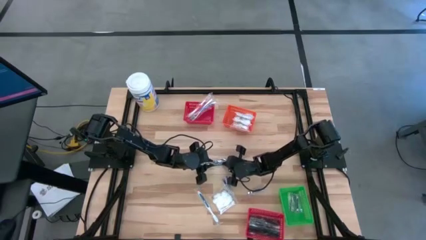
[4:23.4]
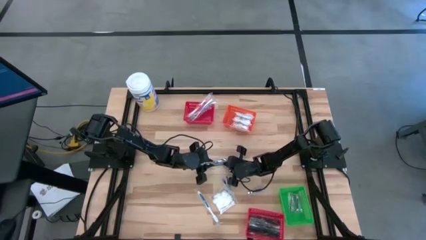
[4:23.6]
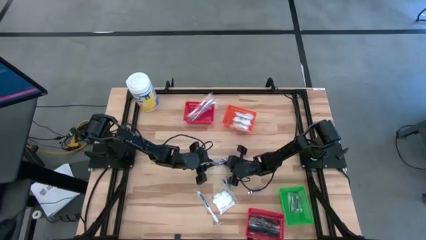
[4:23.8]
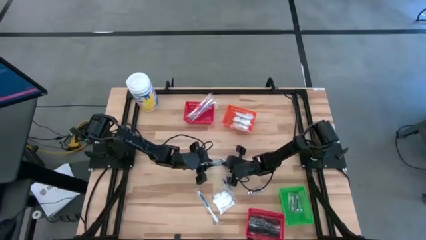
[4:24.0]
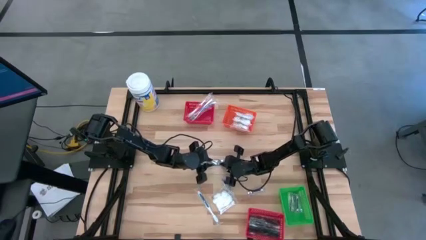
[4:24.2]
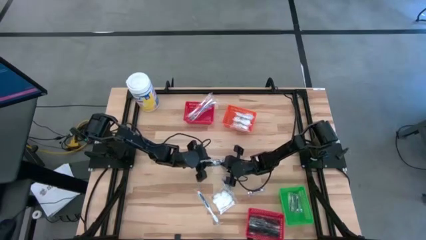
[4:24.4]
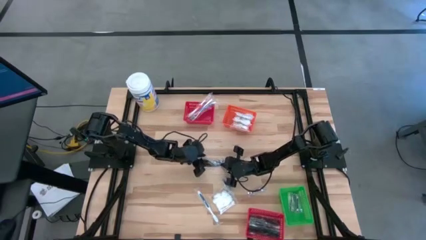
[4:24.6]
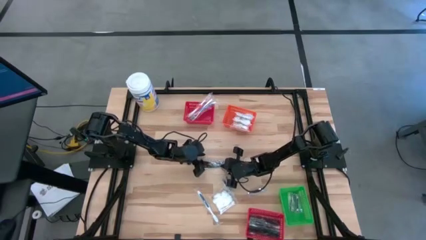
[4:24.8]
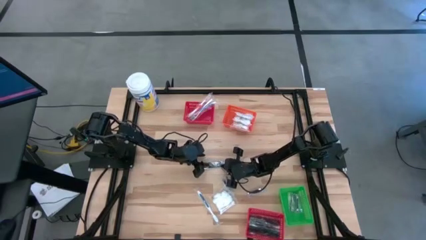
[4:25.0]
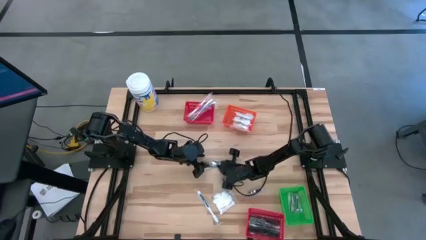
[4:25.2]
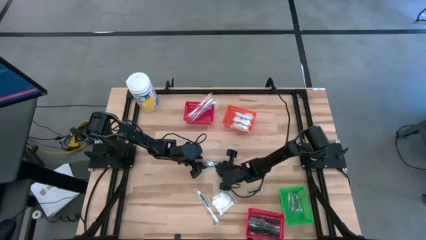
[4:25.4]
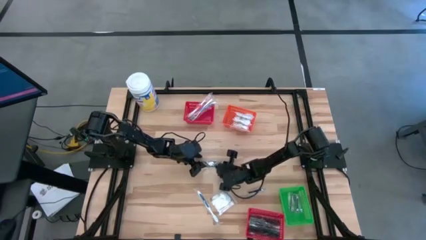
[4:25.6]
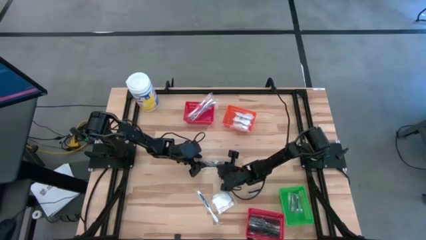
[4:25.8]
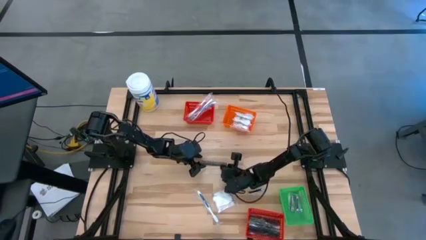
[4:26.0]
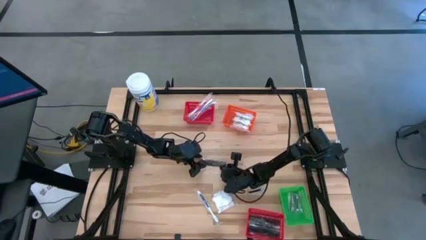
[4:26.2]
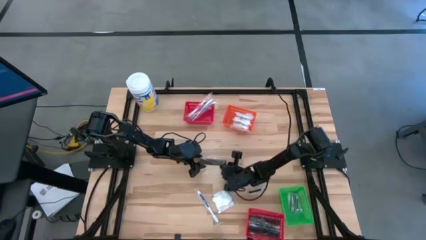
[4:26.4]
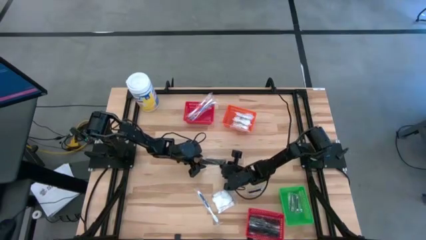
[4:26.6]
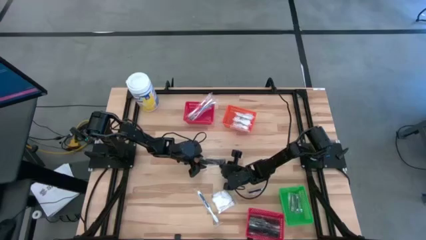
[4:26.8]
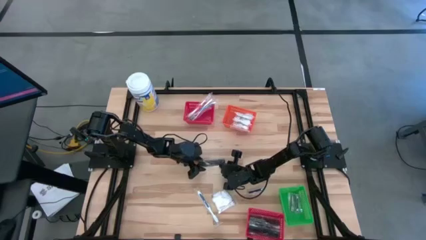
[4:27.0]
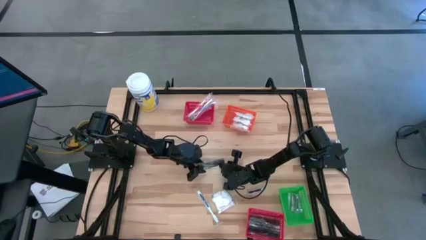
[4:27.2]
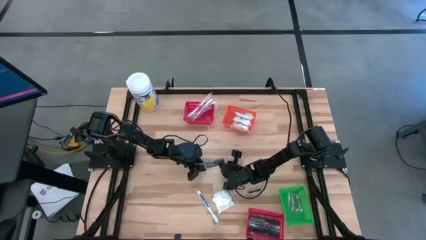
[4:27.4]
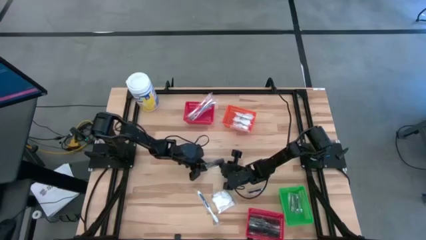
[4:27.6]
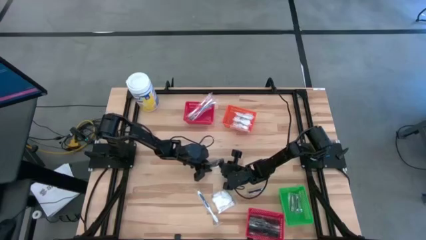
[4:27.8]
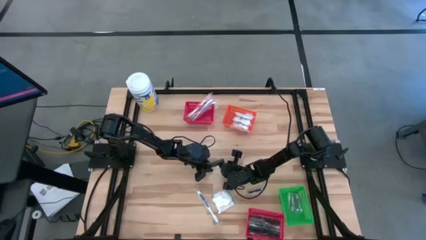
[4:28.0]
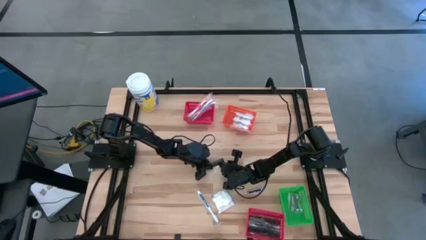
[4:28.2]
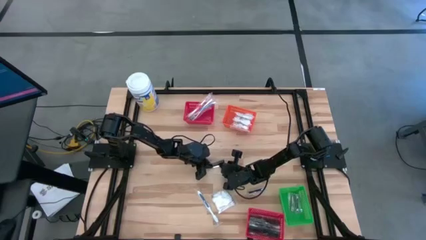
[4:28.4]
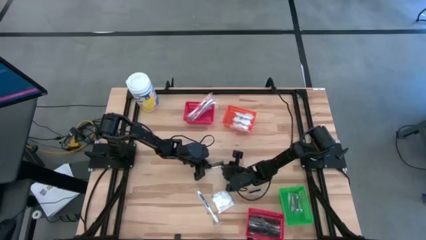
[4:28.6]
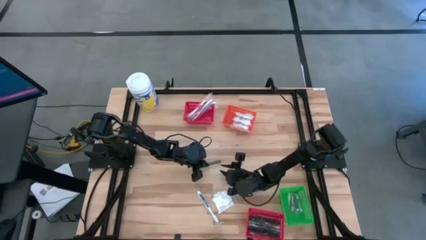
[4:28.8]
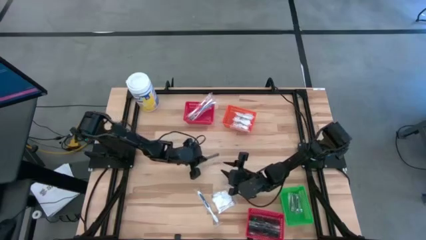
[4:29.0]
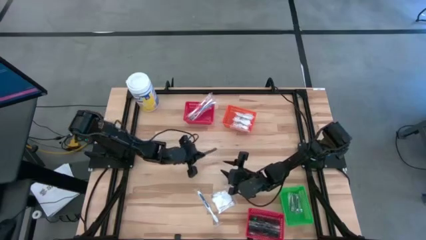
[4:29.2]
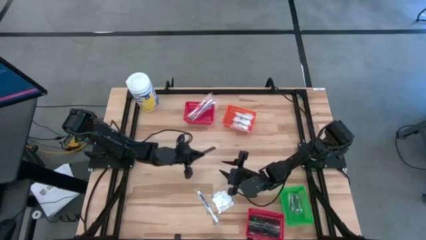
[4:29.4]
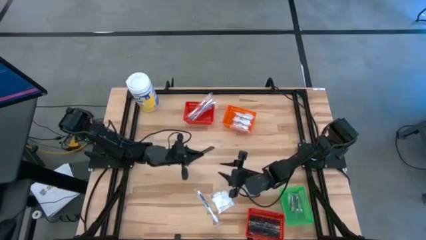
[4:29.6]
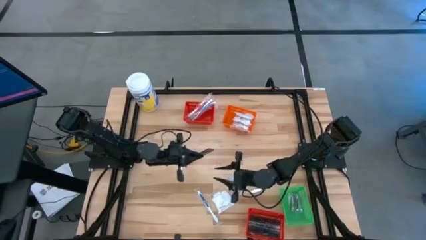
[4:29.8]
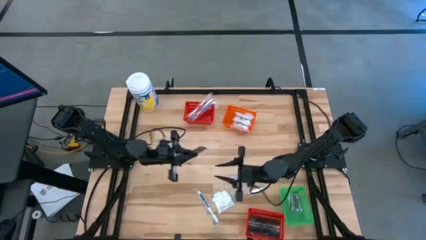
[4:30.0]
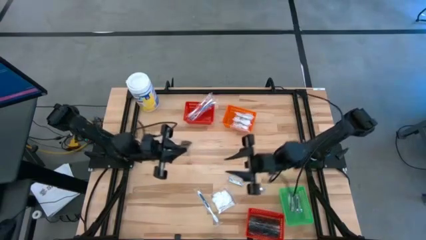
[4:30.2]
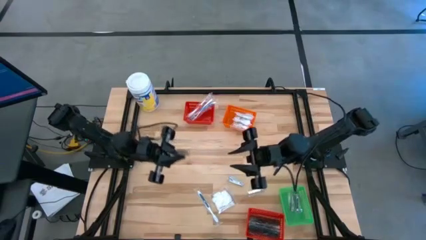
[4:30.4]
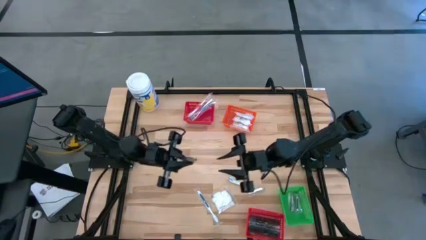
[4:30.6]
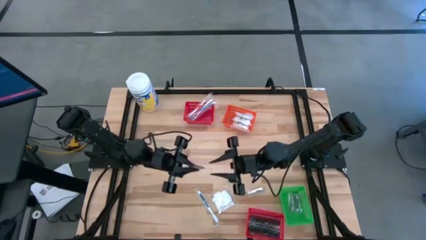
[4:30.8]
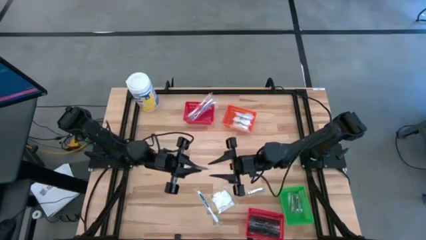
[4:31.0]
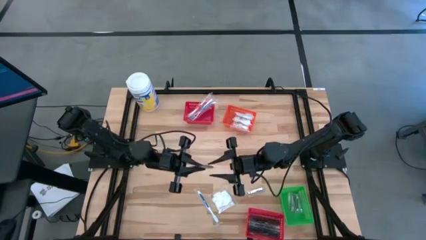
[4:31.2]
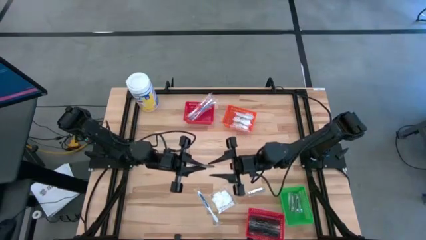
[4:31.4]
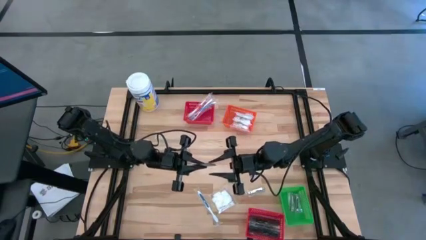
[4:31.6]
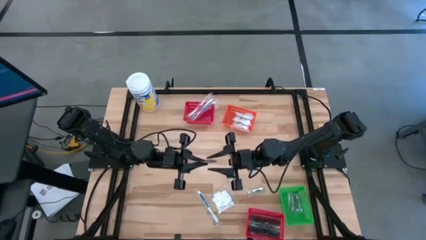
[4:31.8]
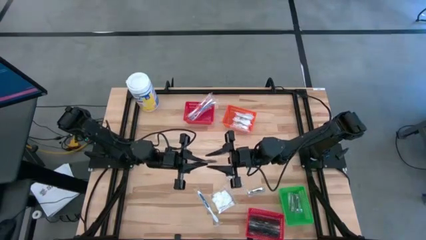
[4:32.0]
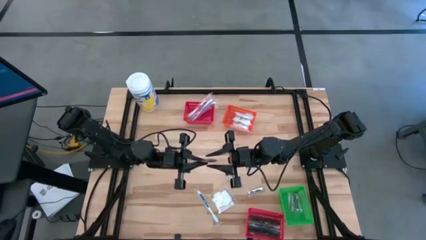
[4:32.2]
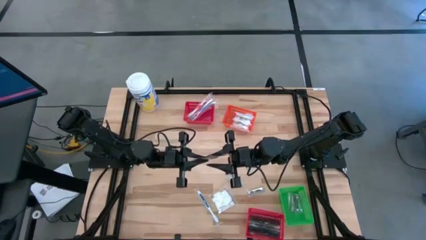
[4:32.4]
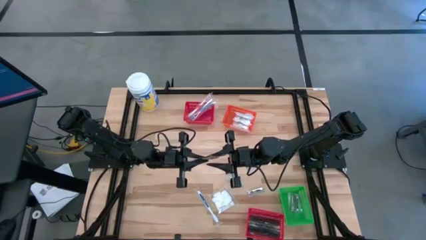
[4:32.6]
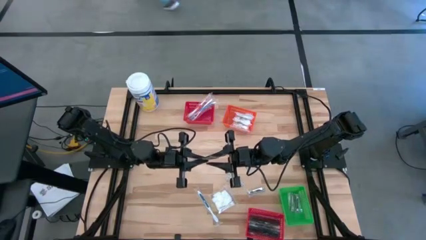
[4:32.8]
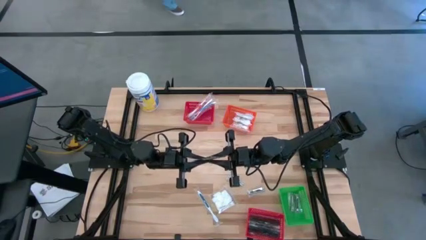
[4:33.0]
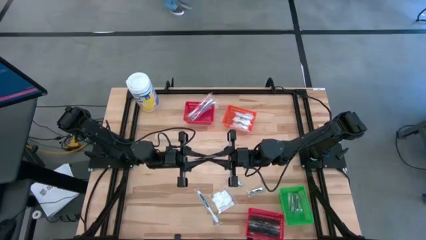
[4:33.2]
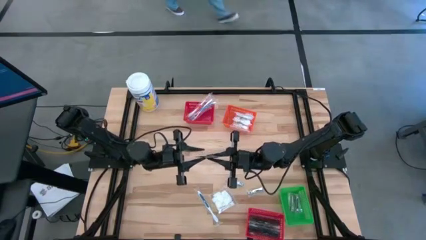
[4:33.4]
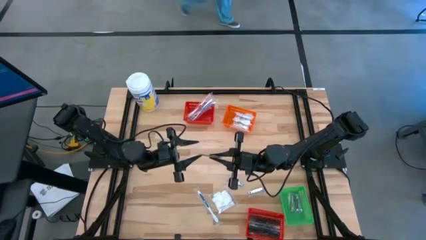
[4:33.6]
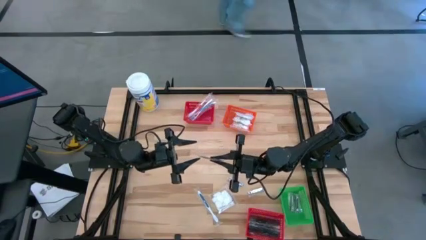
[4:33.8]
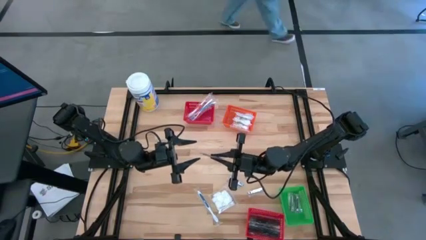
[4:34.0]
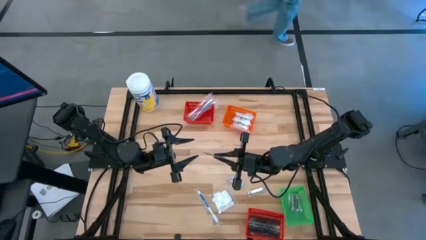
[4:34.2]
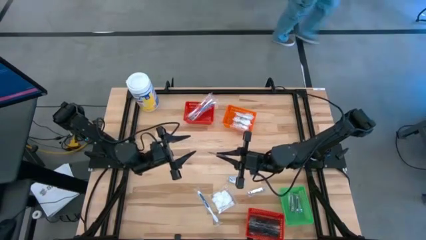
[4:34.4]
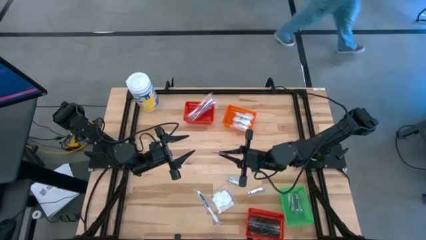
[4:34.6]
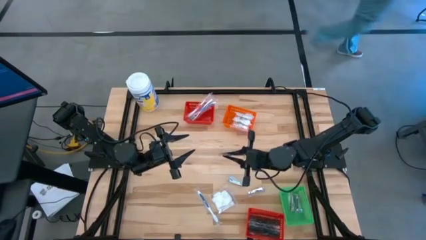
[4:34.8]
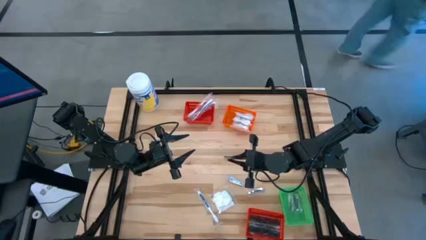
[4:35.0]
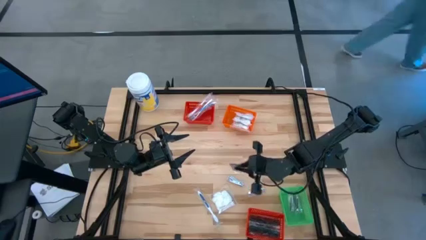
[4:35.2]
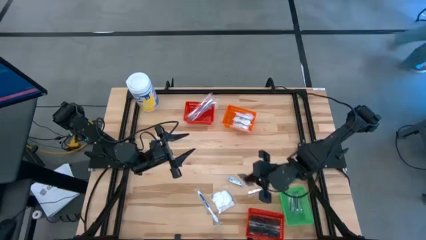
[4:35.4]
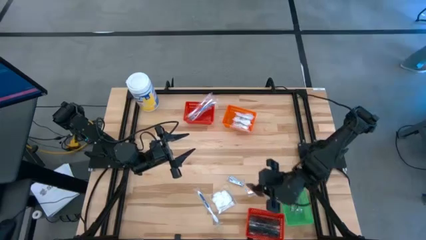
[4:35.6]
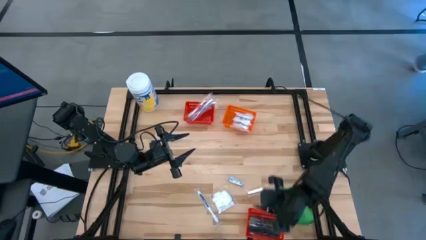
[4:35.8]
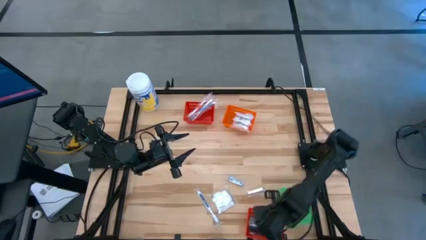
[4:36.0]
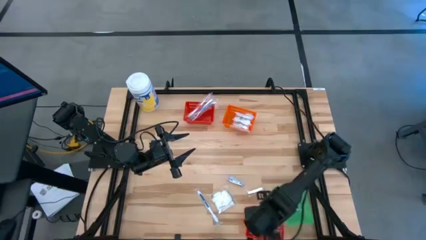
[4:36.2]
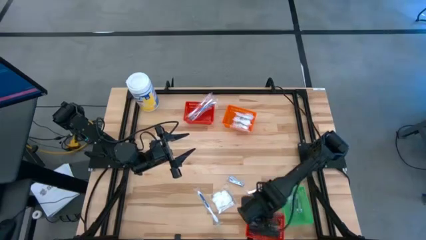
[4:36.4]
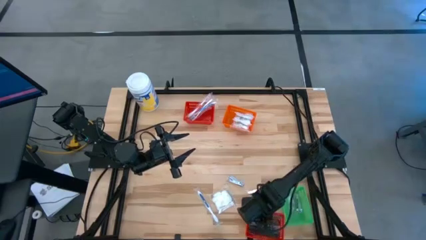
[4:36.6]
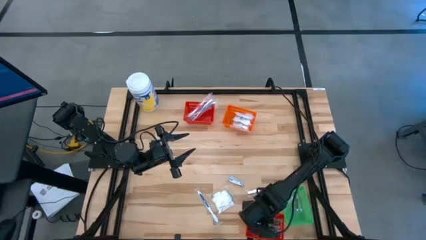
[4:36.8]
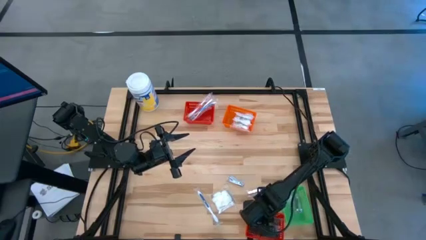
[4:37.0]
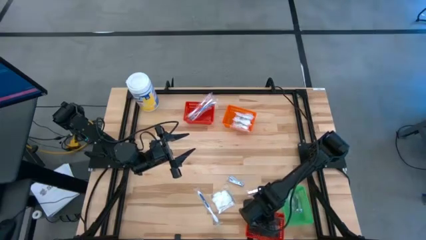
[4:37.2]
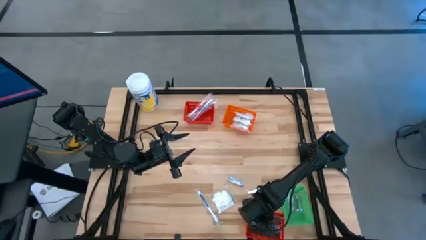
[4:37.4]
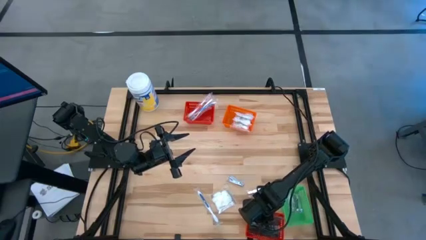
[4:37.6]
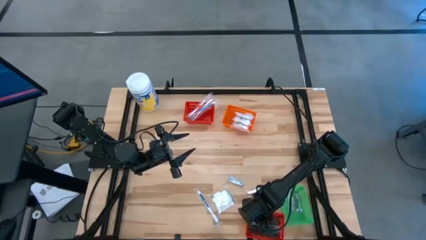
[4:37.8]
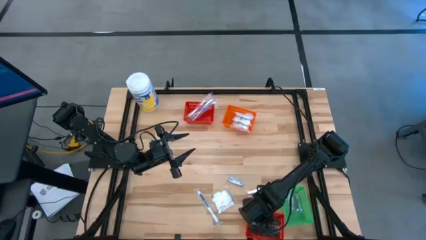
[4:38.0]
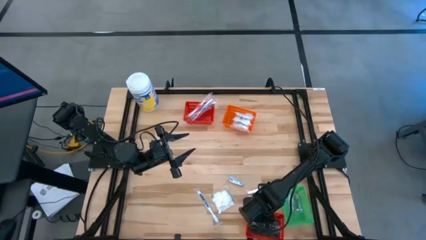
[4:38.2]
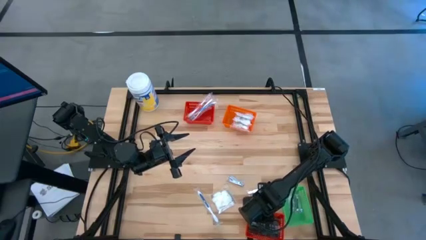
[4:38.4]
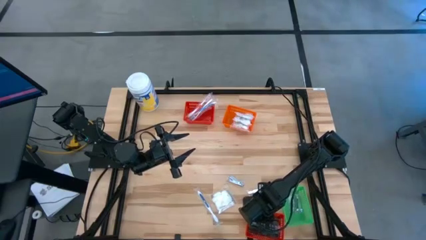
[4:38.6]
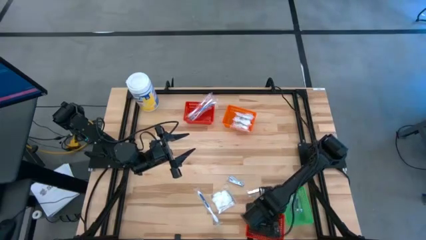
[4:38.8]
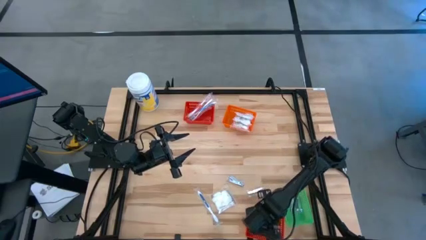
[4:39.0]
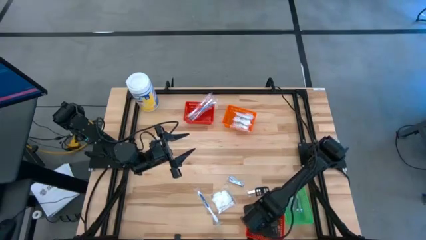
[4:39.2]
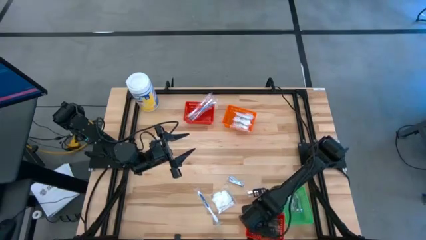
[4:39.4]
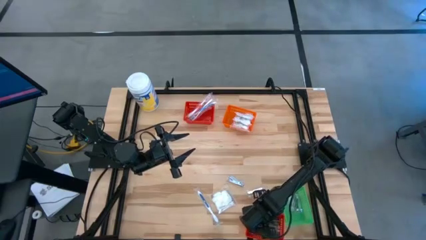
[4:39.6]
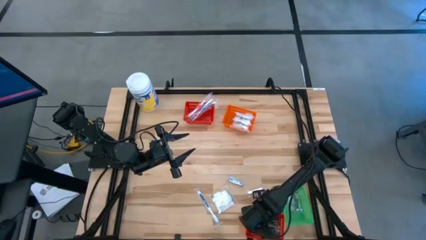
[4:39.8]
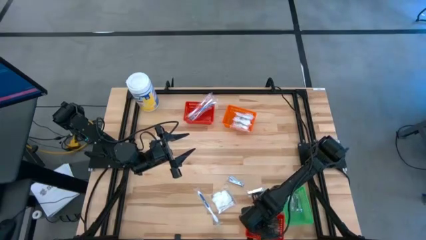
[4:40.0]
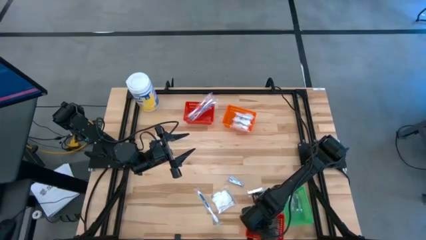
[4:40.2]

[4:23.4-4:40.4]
Task: Pick & Place Travel size toiletries
Put the black comb into the bottom red bin
